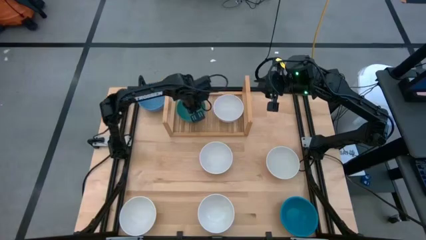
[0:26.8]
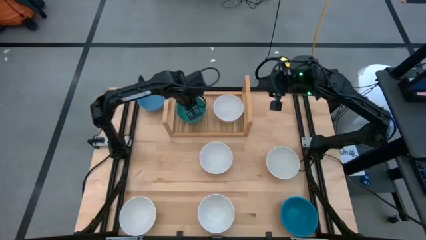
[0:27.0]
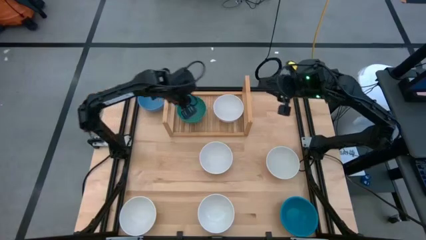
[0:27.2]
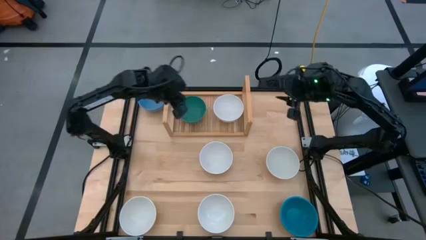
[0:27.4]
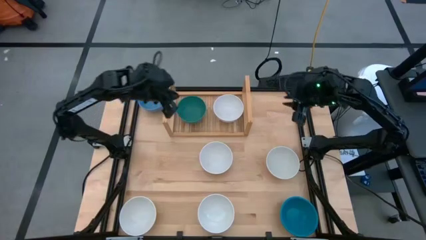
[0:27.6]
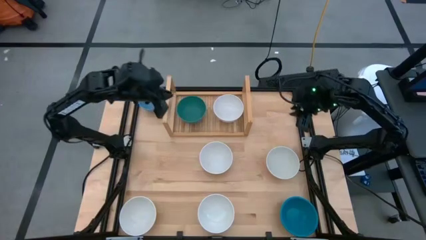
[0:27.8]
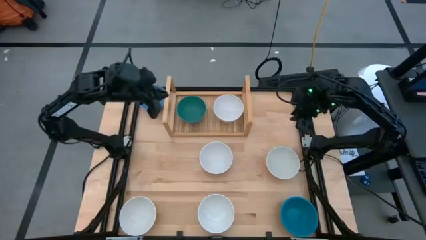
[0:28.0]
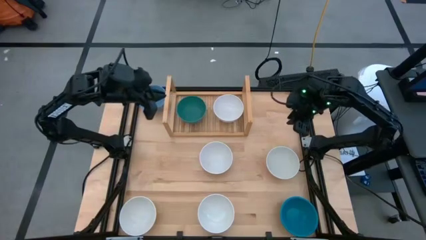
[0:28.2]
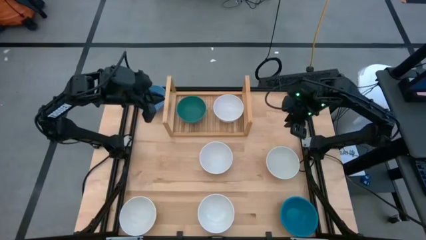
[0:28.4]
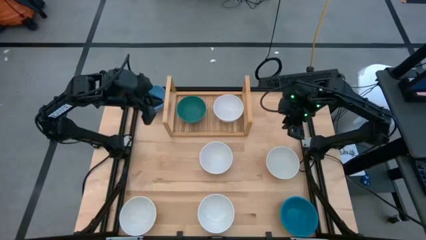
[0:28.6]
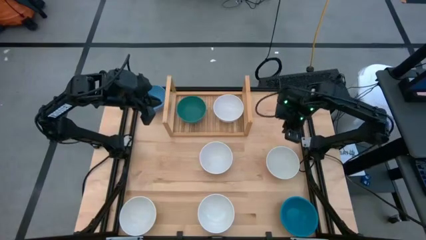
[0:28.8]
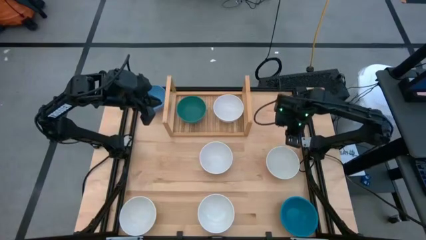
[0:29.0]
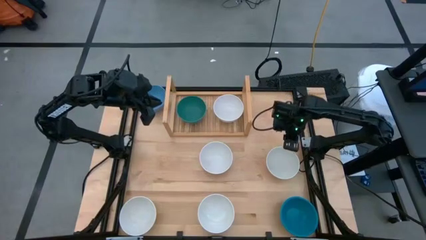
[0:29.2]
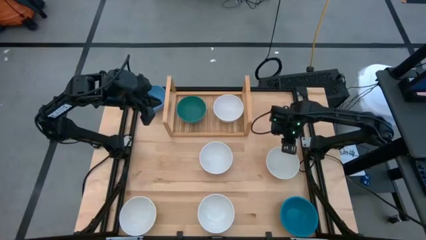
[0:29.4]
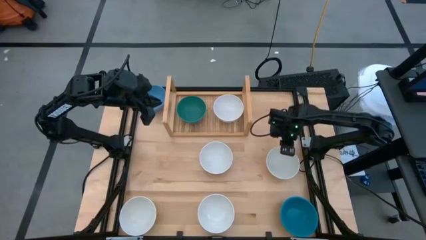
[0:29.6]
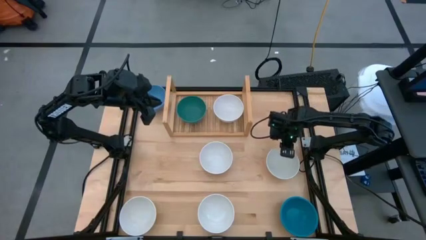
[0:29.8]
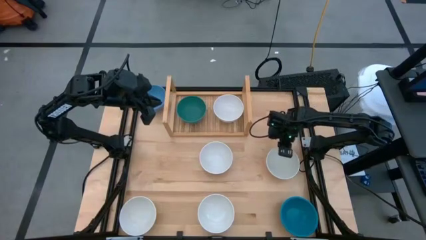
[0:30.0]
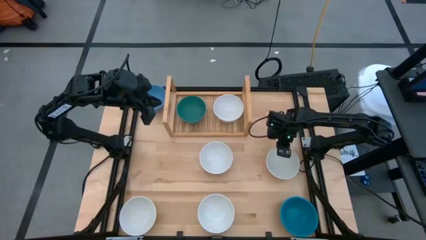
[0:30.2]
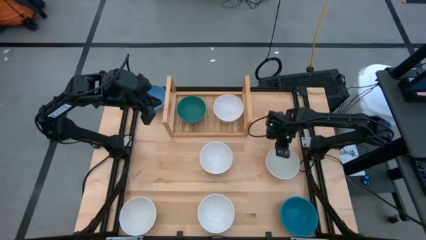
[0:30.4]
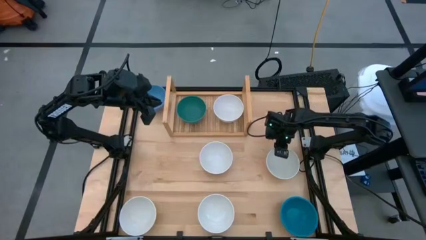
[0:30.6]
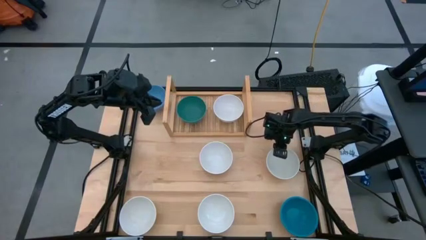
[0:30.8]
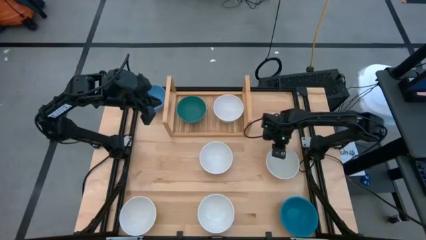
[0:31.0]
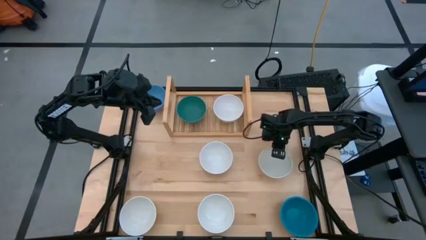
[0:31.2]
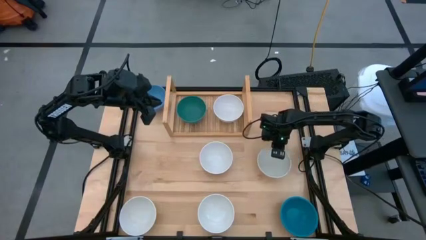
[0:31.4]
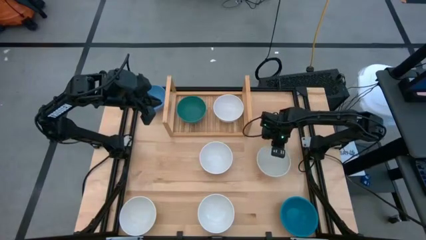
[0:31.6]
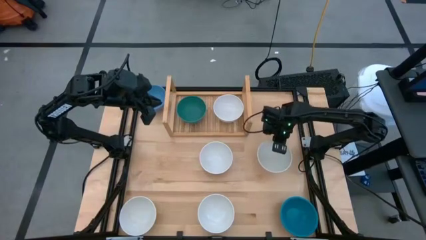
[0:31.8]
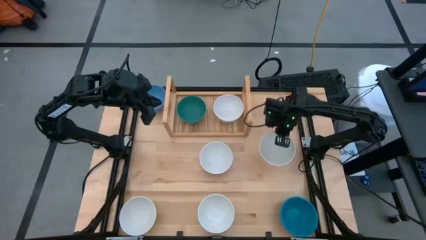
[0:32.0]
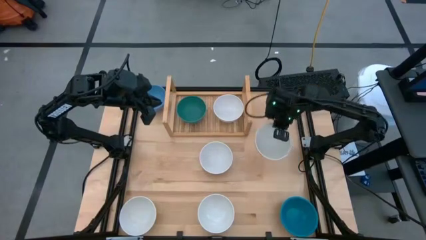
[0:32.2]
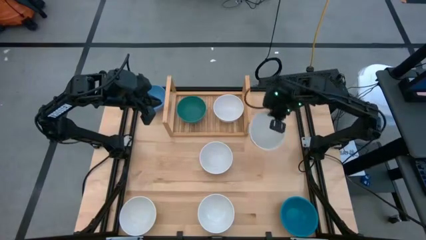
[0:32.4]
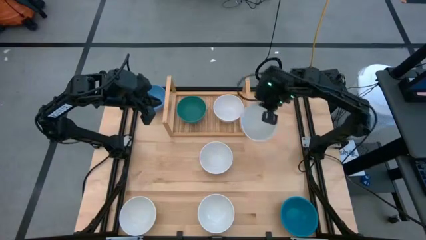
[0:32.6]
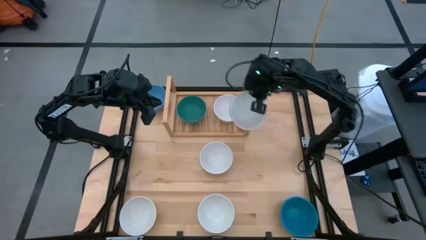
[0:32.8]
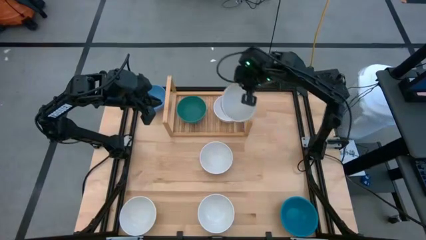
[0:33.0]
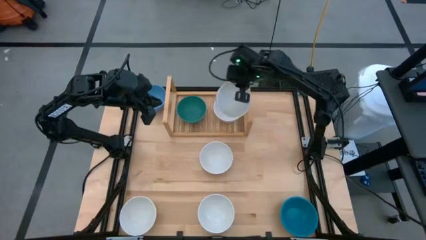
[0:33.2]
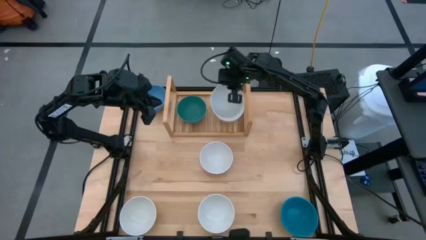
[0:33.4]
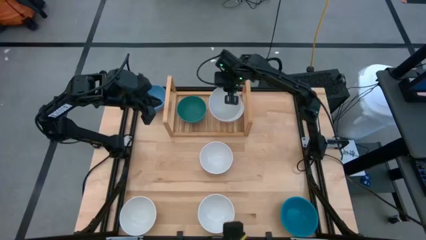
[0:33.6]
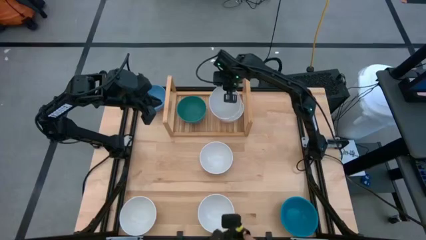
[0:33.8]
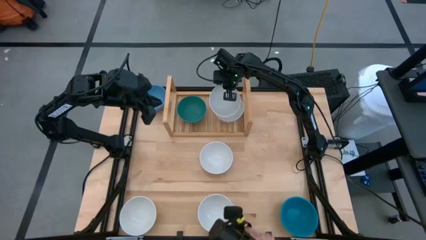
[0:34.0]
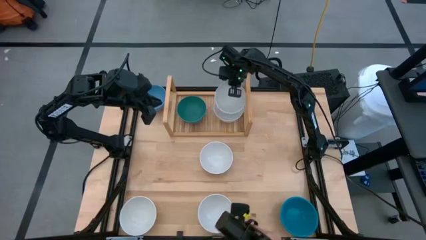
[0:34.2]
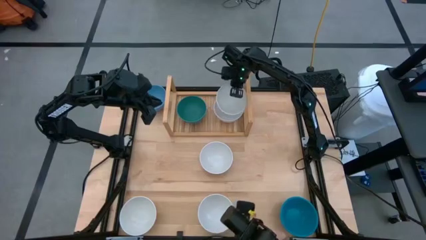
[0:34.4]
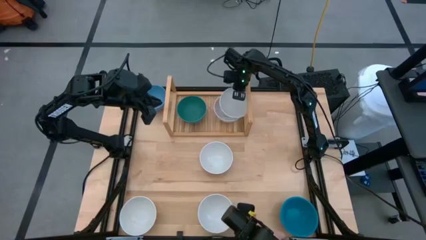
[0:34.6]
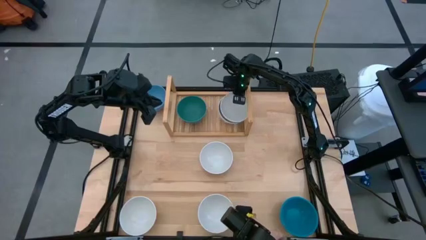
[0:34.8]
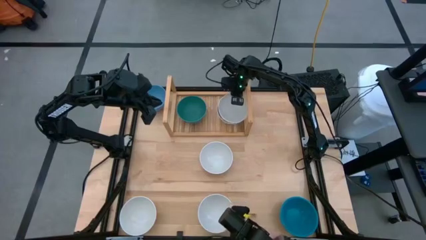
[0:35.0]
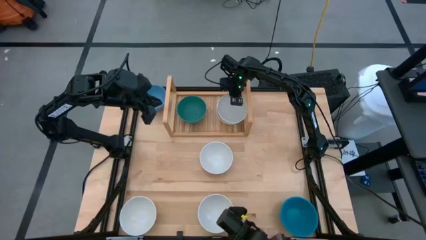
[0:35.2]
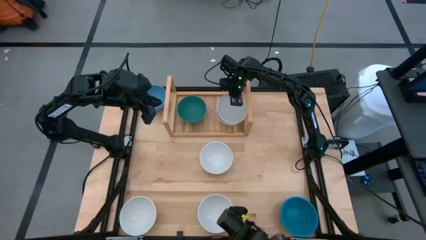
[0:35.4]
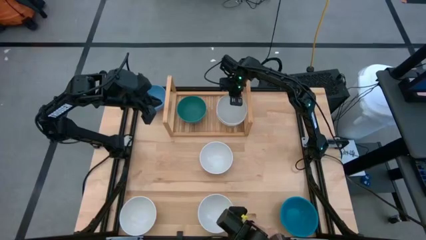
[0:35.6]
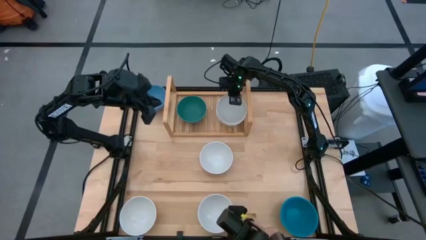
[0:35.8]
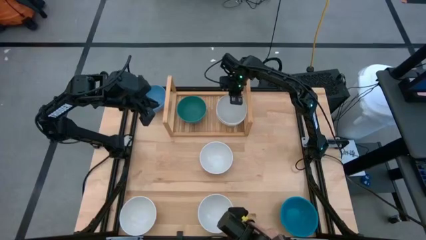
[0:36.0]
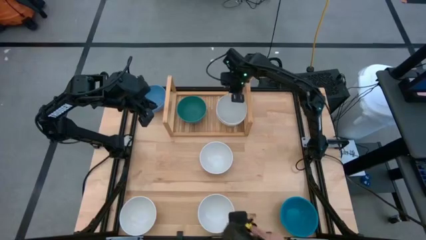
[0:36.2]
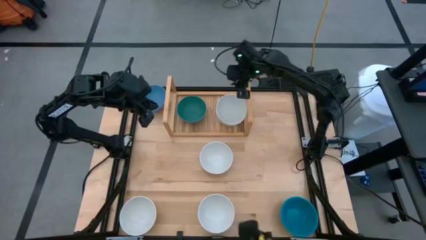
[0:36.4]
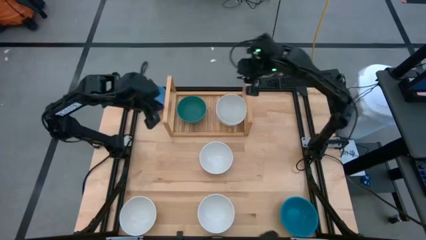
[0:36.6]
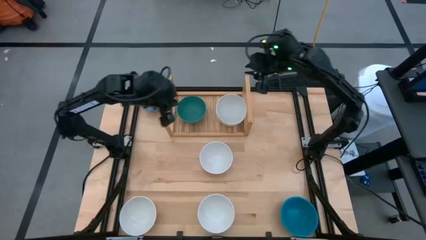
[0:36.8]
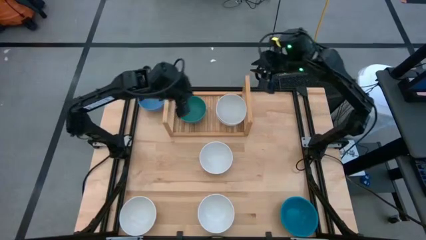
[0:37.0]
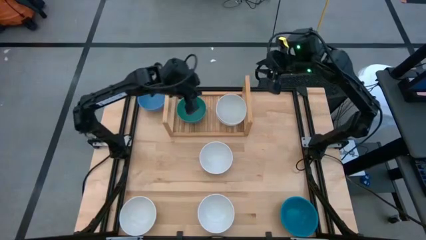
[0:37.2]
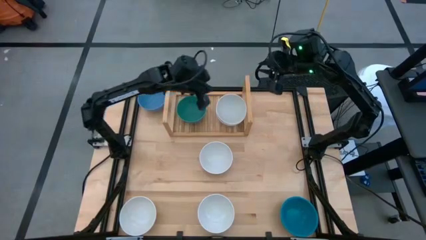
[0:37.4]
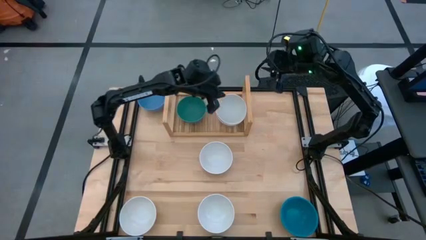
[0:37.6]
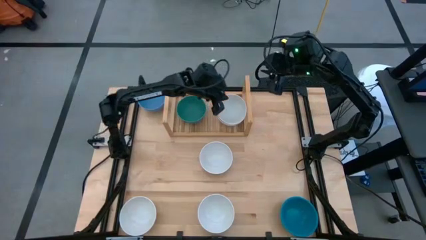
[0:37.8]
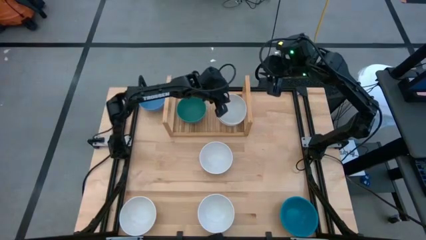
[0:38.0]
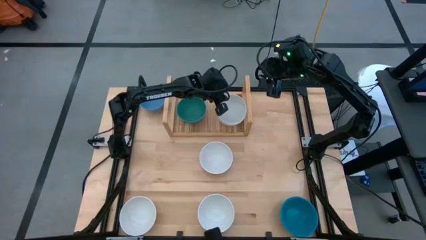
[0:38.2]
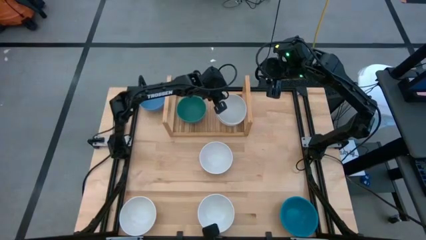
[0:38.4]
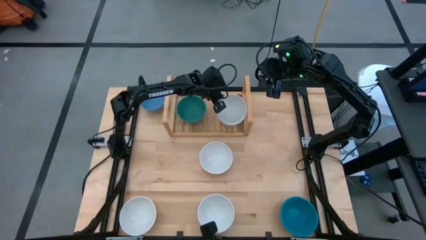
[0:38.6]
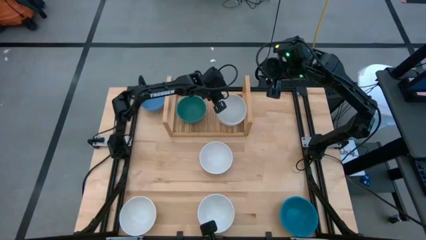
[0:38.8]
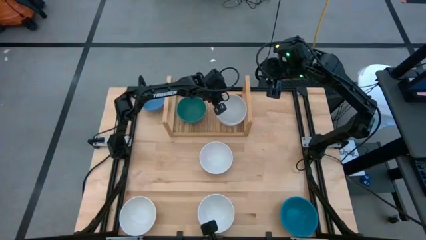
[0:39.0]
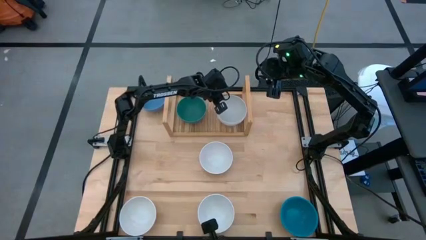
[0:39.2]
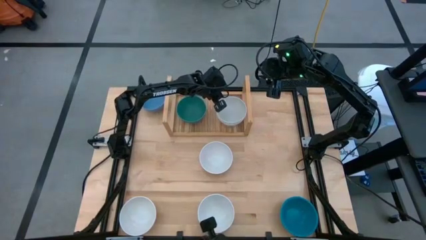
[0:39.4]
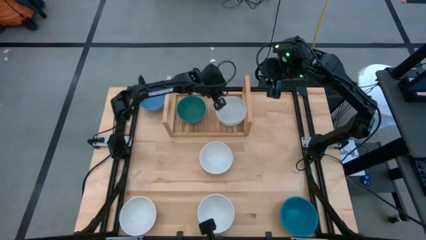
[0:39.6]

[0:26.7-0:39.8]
Task: Place and stack bowls onto a shelf
Stack the white bowl on top of the white bowl on the shelf

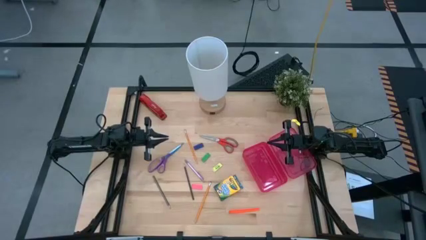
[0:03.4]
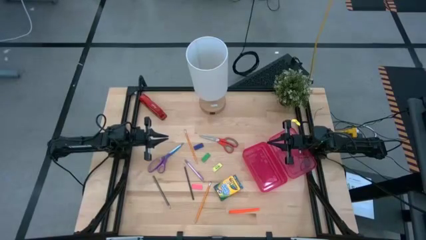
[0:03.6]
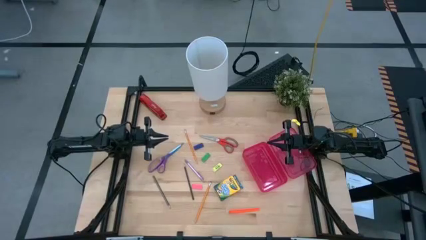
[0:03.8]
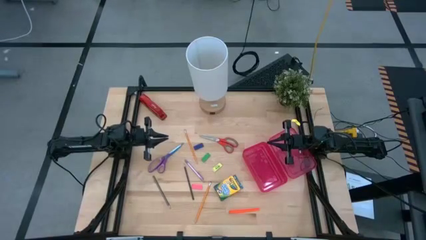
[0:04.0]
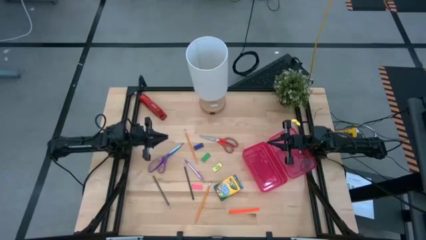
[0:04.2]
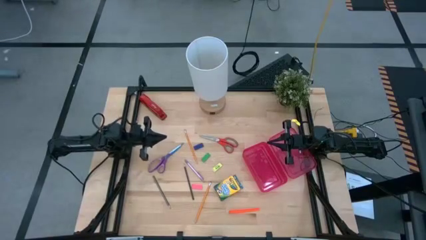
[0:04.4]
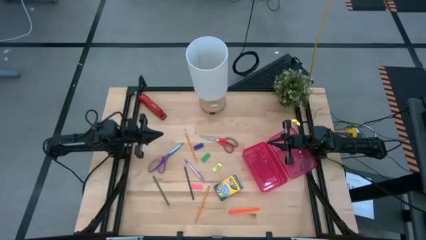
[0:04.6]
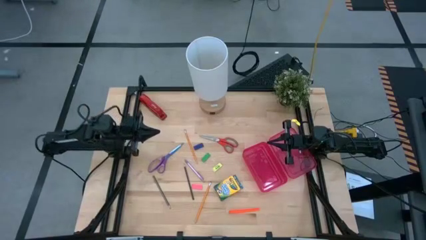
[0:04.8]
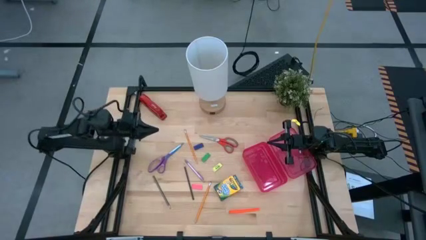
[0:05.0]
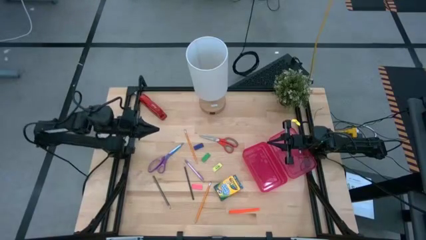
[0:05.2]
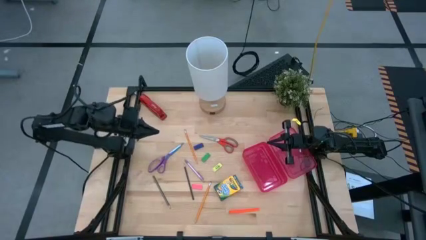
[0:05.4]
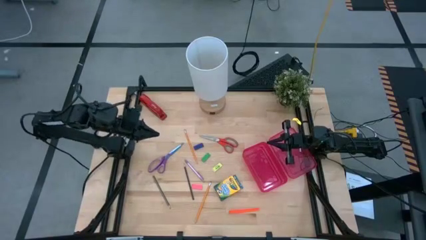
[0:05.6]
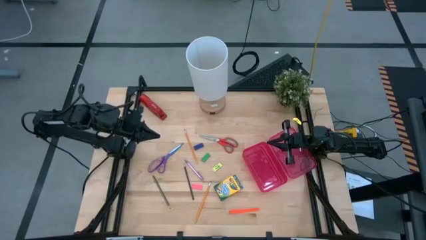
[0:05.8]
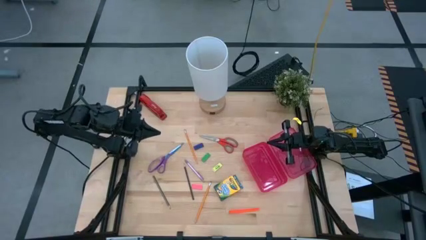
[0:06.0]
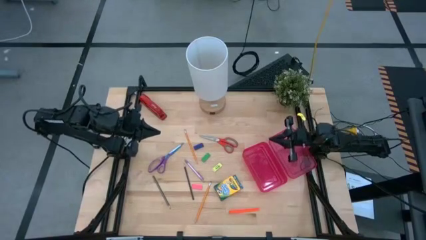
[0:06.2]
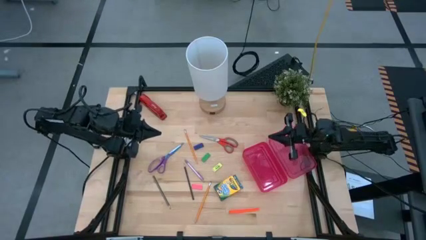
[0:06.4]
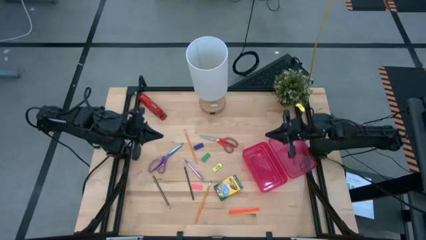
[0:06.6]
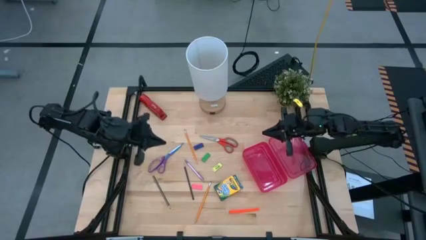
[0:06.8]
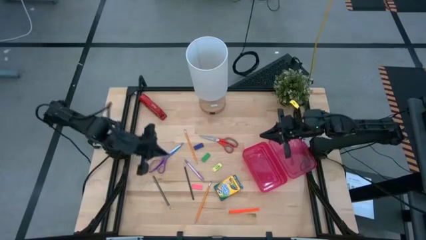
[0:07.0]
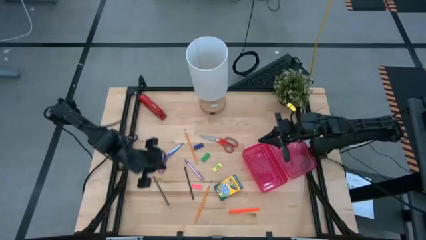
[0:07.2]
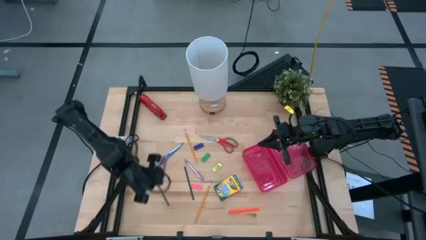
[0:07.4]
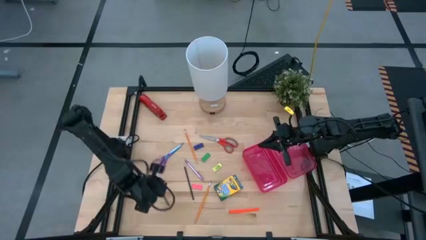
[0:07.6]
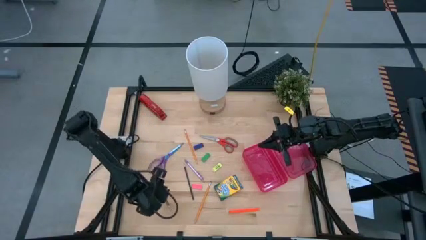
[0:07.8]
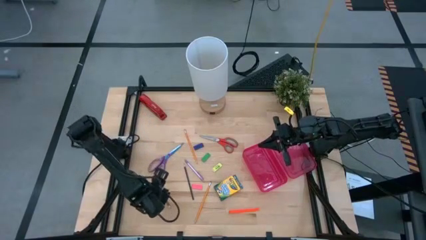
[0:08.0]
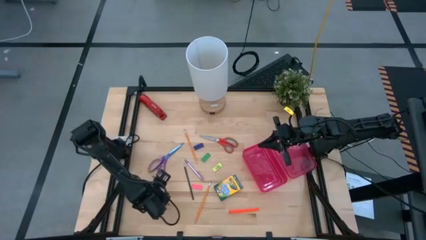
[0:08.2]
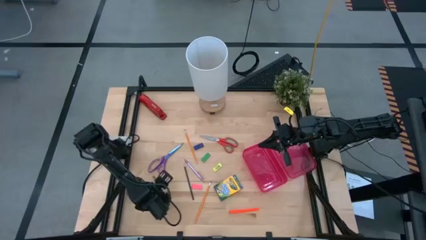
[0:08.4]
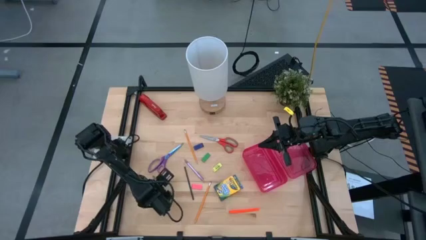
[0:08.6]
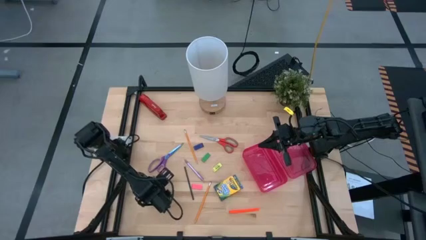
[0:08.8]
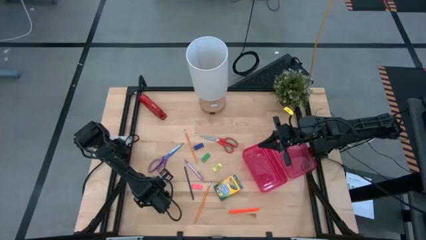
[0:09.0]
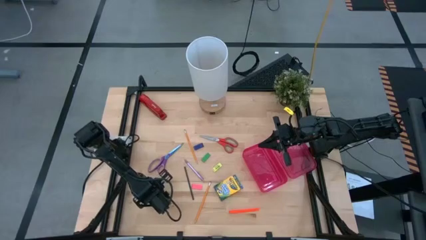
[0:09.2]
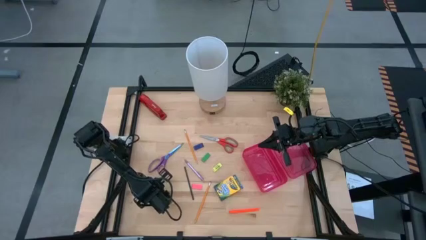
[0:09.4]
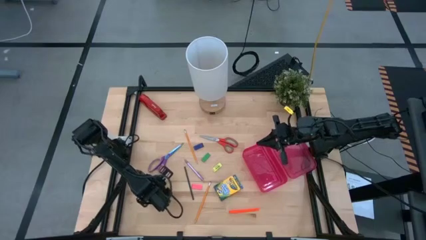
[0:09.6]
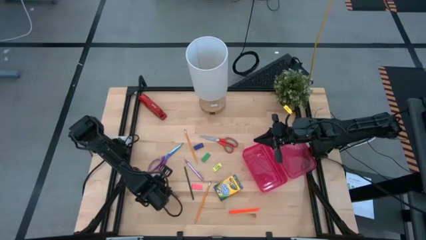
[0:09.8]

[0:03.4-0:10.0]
Task: Pack school essentials
Put the left blue pencil into the pink supply box
